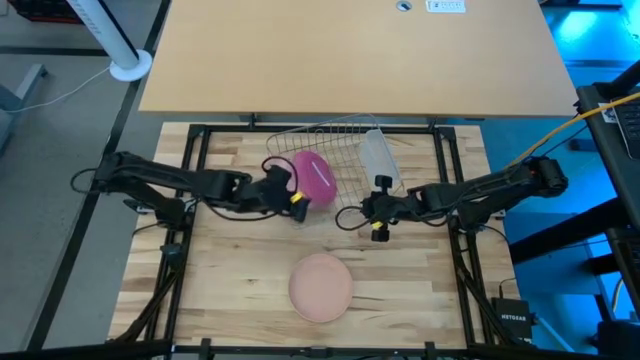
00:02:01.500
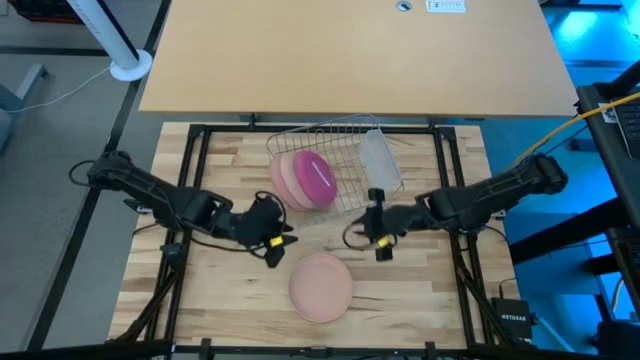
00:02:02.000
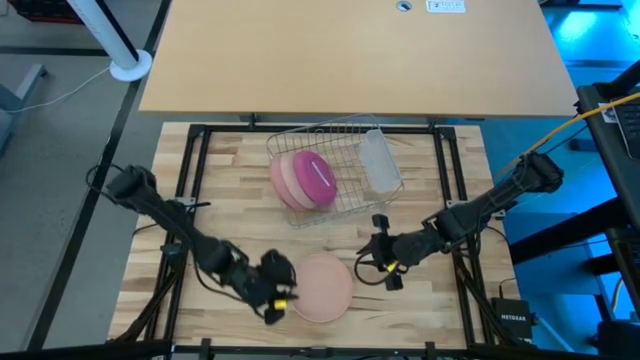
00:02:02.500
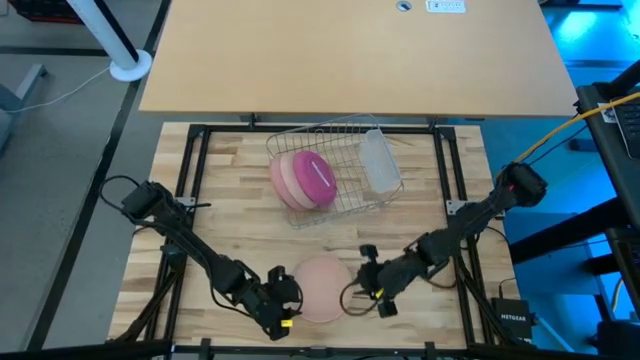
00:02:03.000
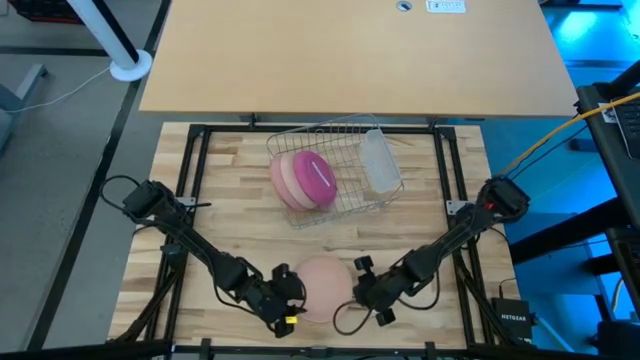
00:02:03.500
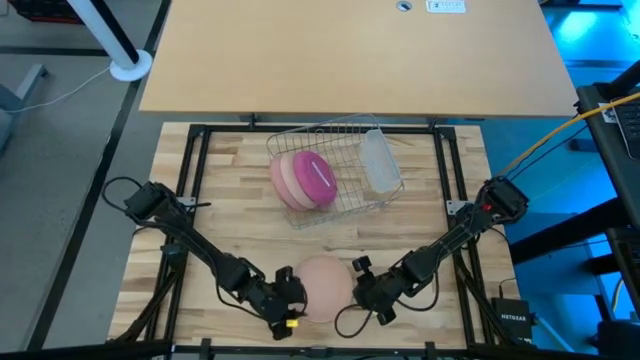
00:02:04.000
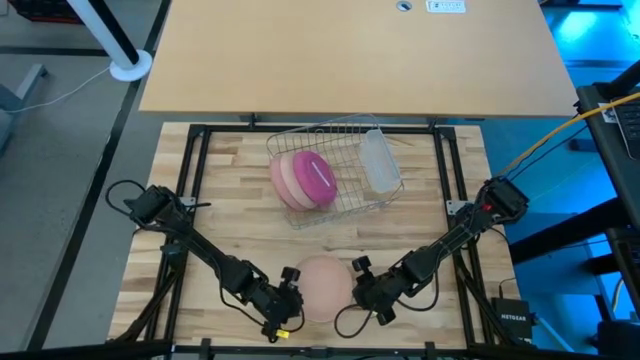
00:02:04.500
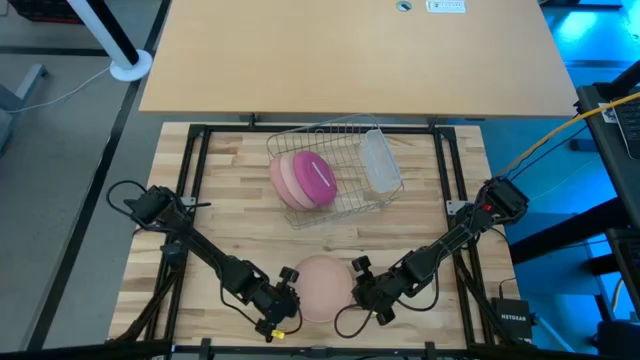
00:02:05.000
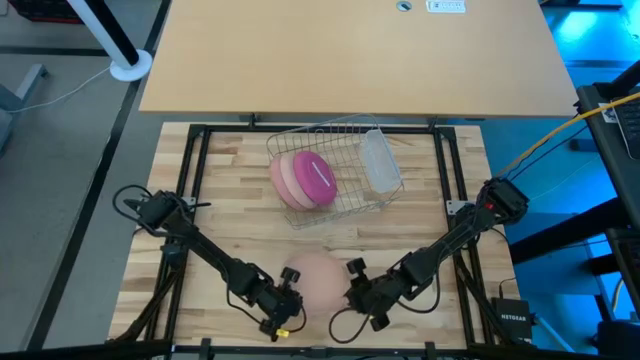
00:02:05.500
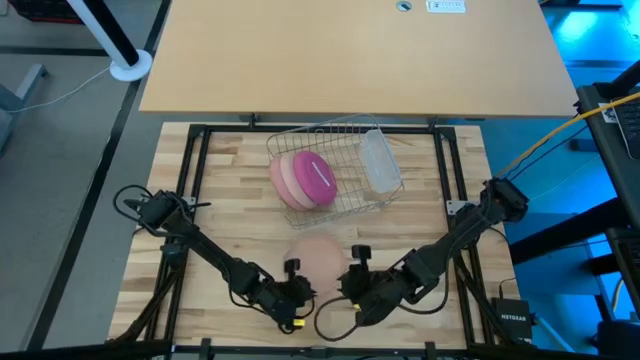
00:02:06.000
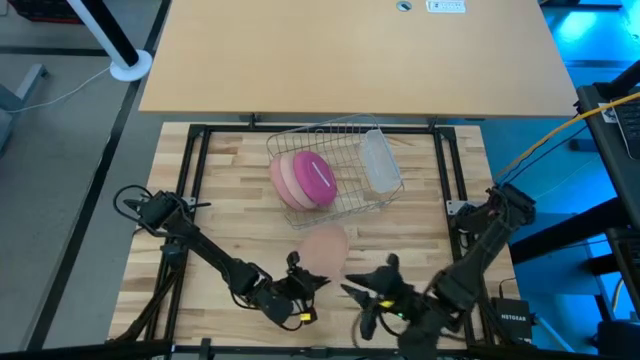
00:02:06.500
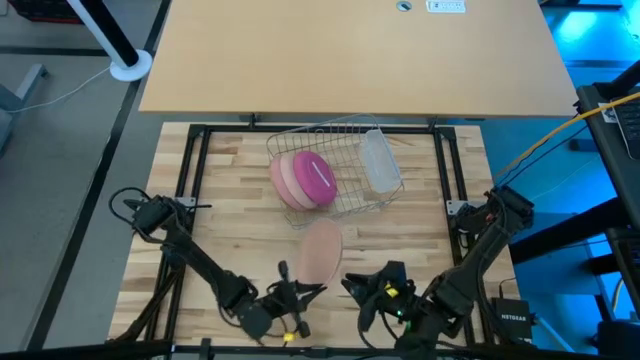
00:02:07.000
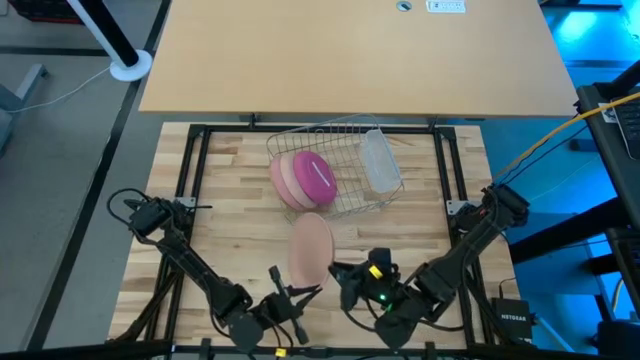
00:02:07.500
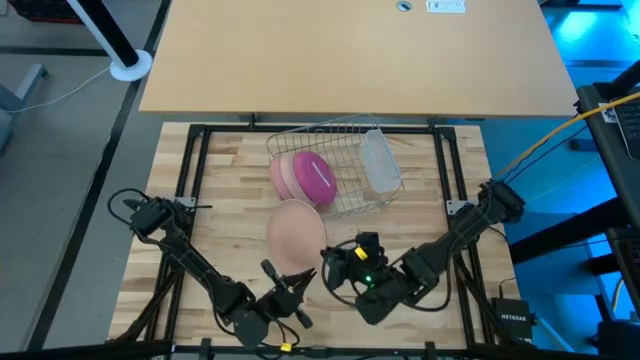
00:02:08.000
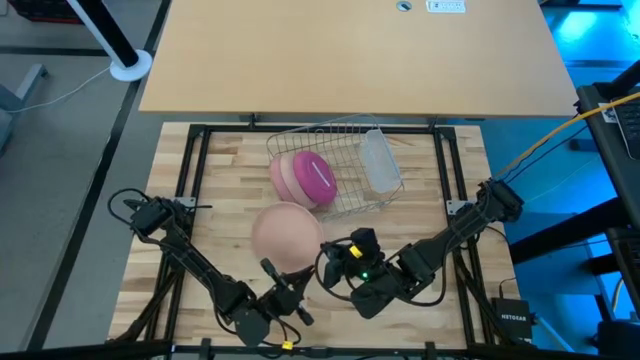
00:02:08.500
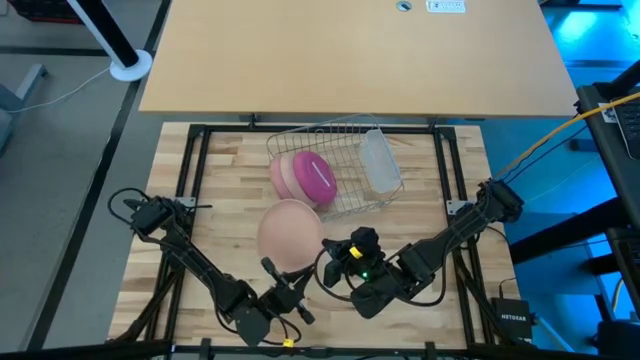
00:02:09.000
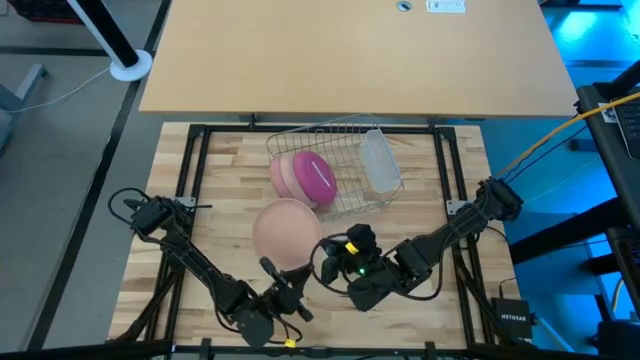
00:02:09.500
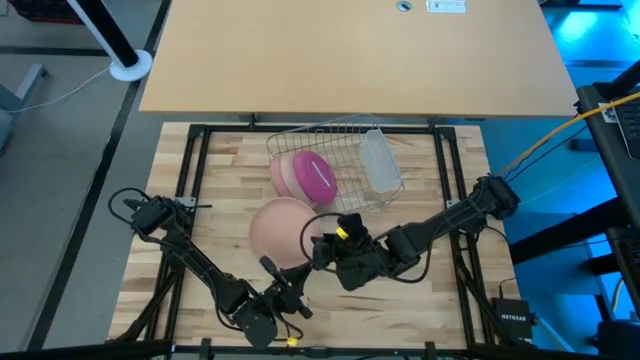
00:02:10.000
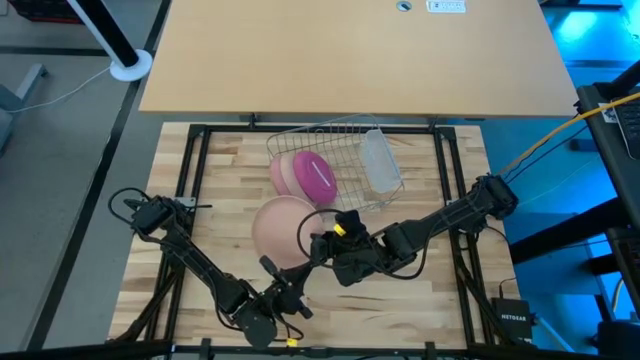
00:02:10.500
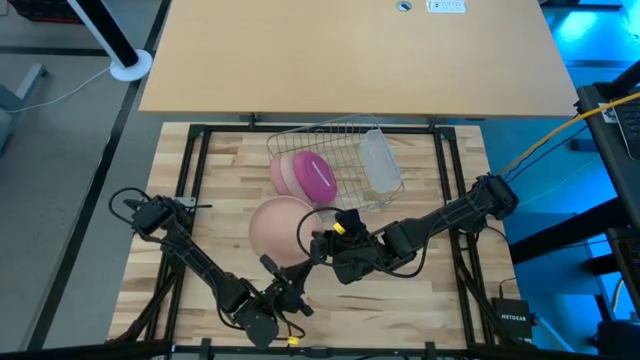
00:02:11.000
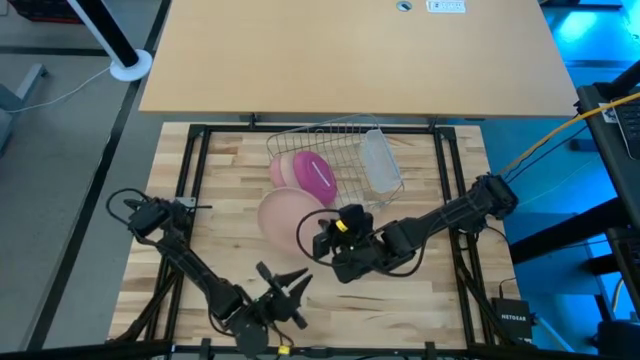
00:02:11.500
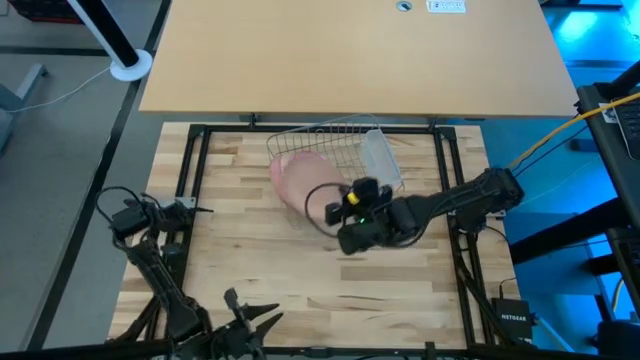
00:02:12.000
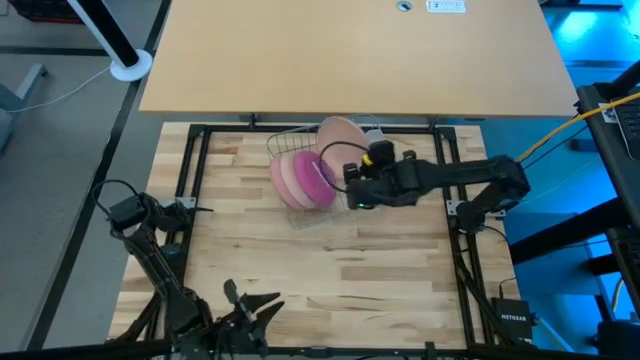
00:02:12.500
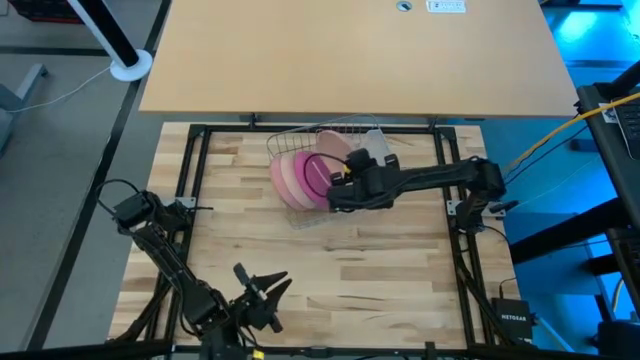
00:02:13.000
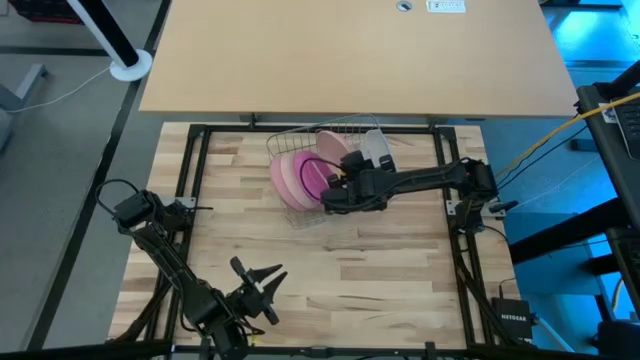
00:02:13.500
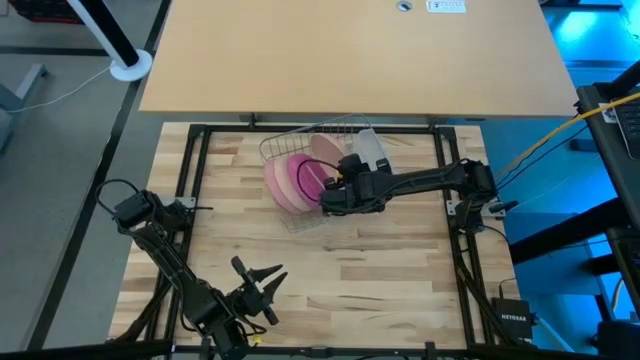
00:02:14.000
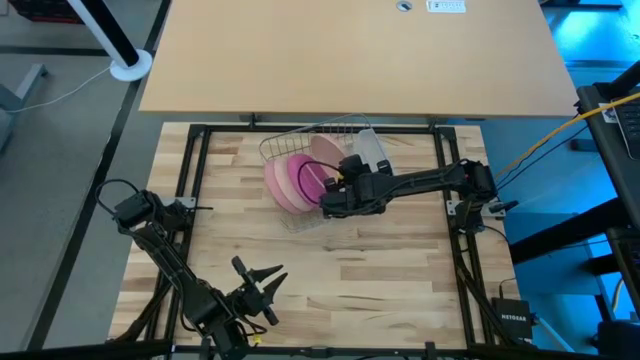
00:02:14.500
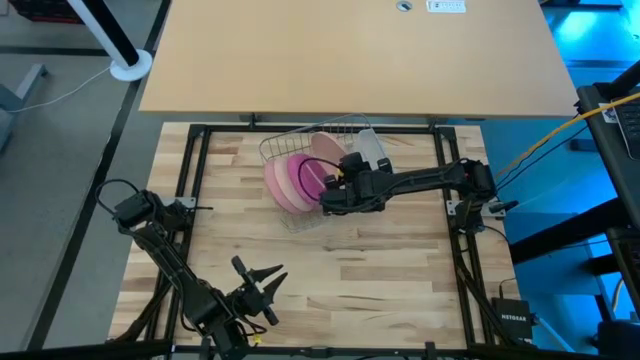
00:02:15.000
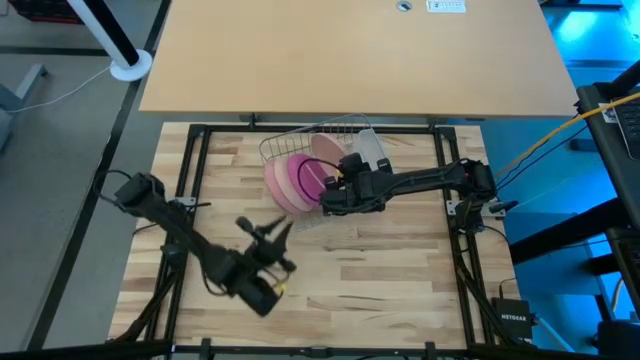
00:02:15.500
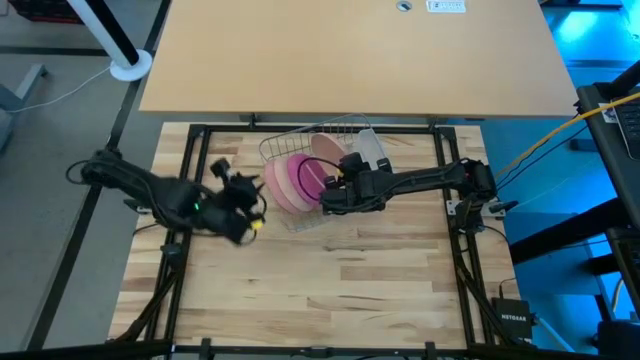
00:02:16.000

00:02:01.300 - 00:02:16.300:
Task: Sort dishes
Put the light brown plate into the dish rack

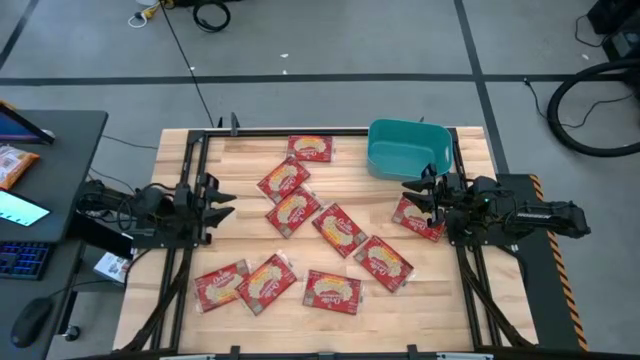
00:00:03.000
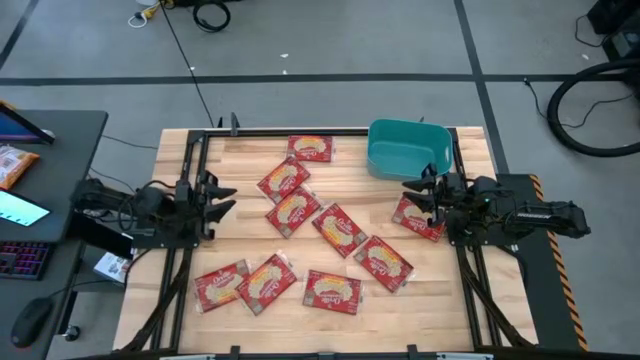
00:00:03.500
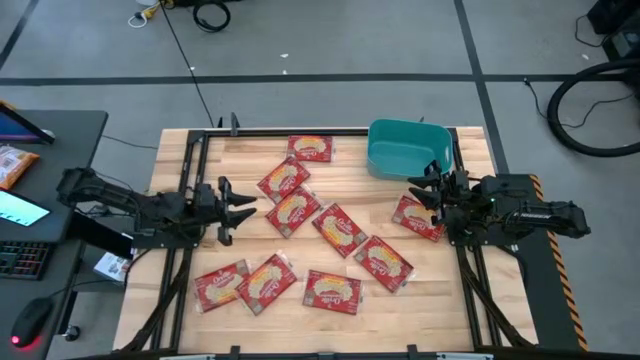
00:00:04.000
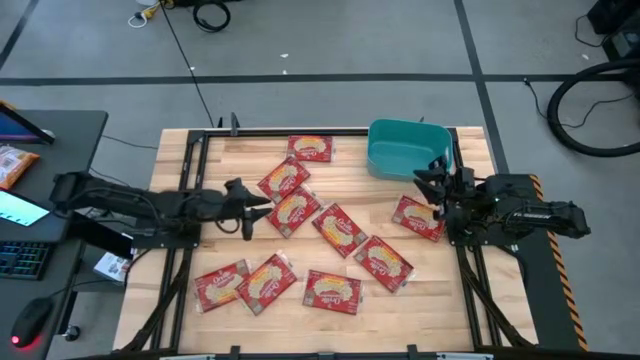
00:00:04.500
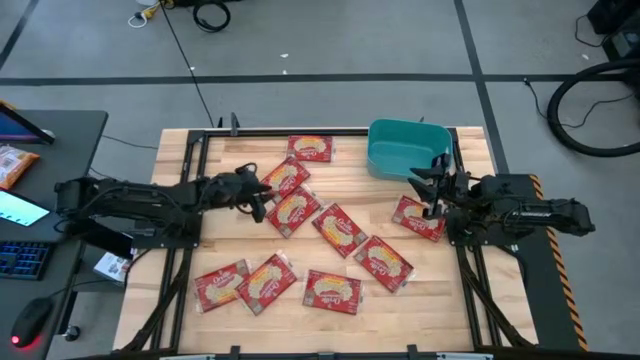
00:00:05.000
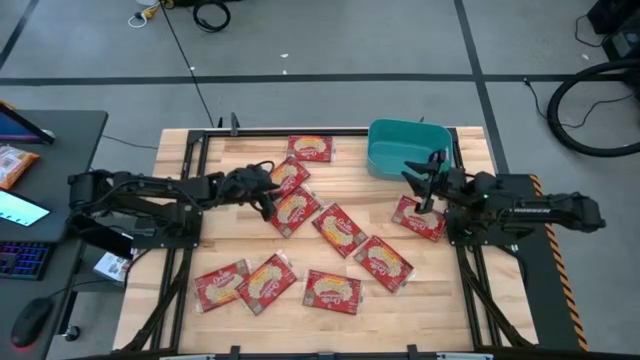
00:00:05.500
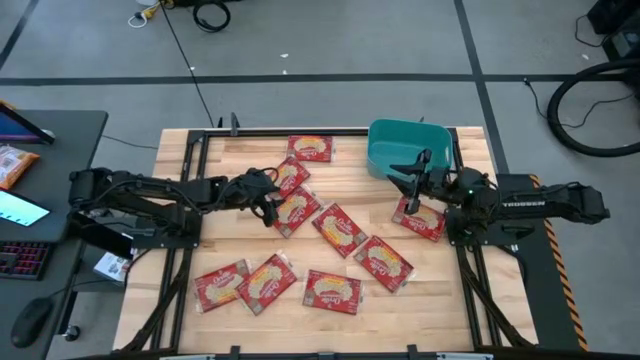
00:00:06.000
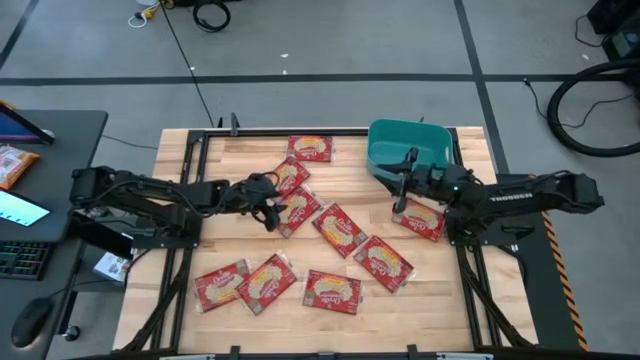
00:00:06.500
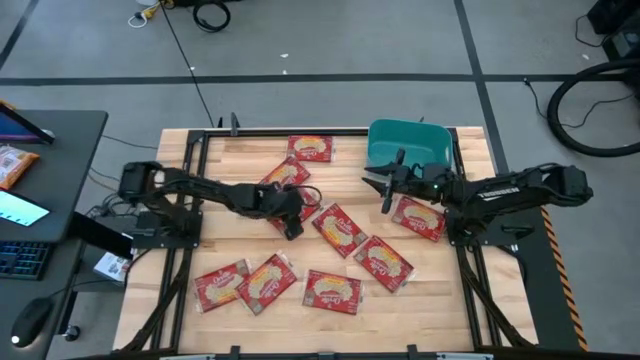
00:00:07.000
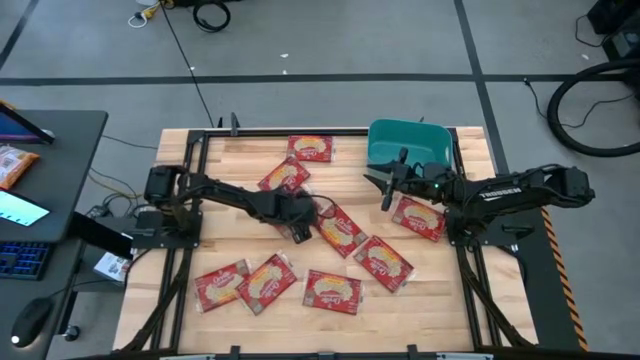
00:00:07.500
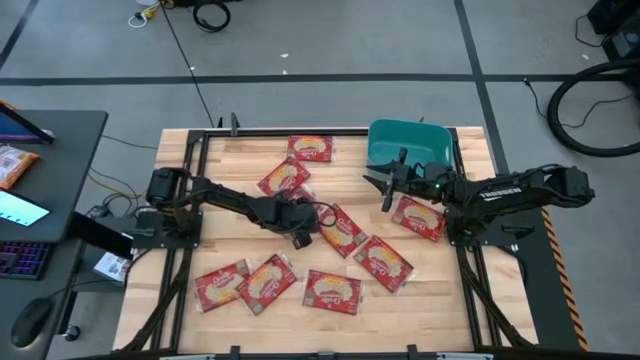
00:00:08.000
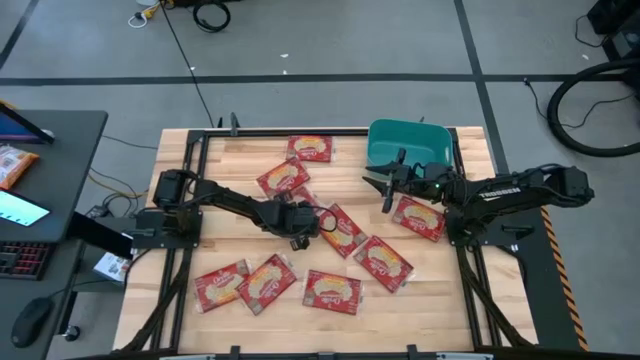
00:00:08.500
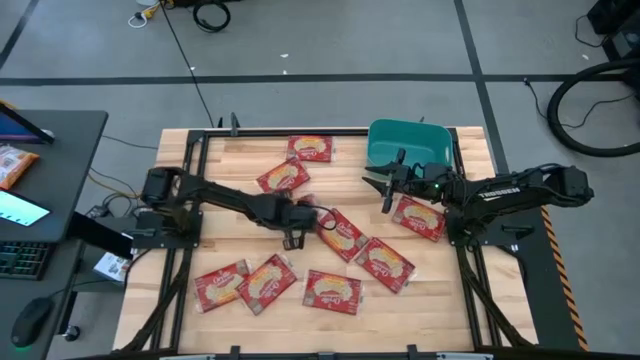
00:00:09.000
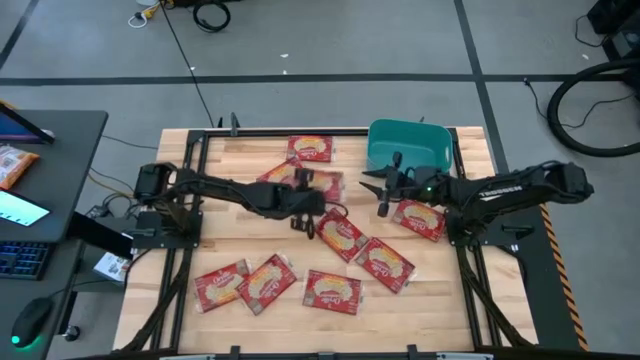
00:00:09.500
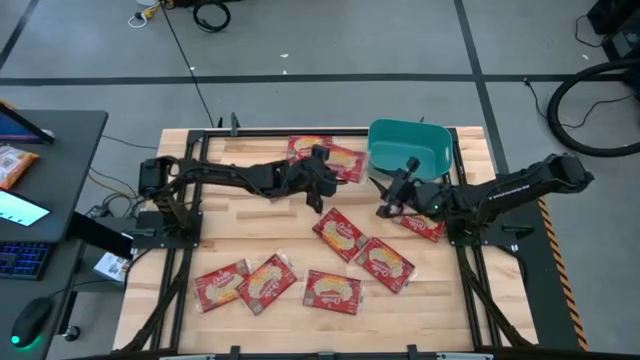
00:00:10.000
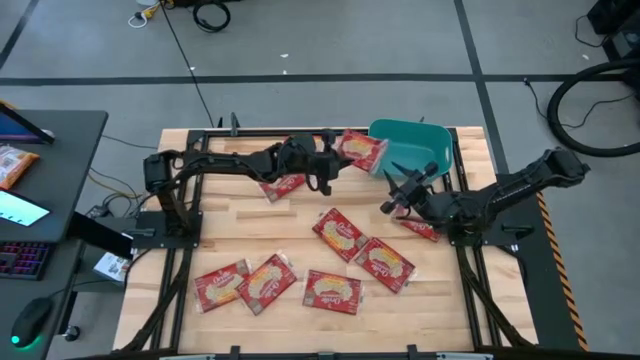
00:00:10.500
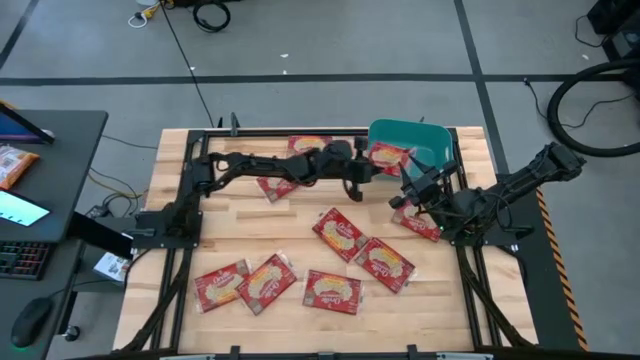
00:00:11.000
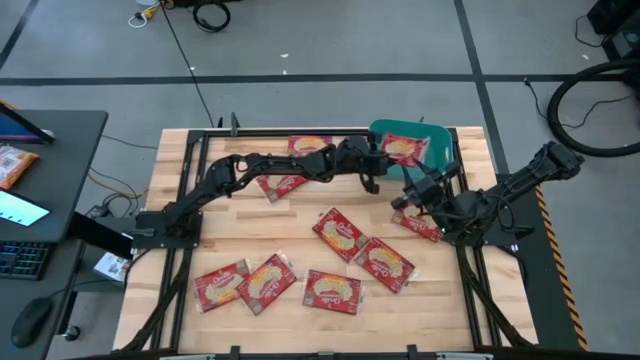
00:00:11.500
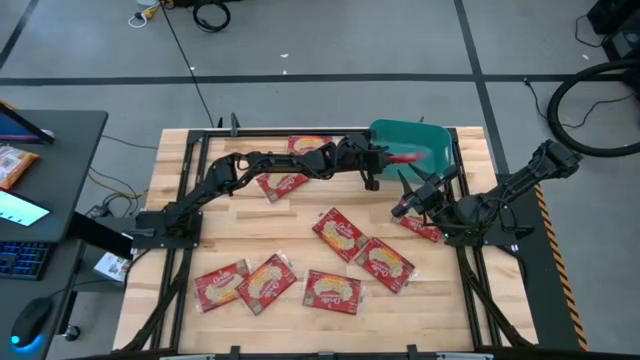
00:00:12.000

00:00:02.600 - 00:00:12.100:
Task: Sort popcorn bags into baskets
Put the red popcorn bag into the blue bin
